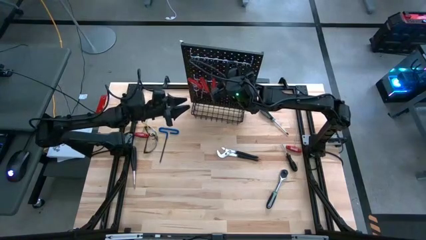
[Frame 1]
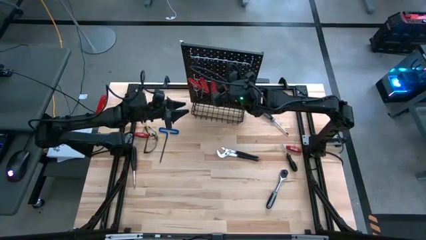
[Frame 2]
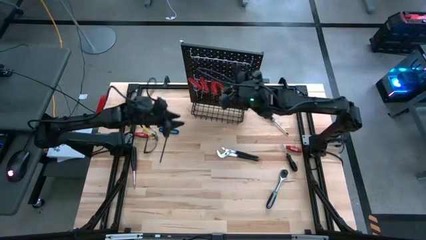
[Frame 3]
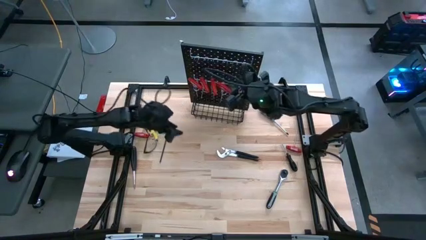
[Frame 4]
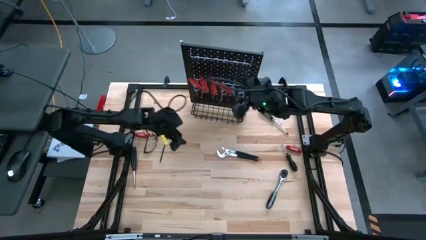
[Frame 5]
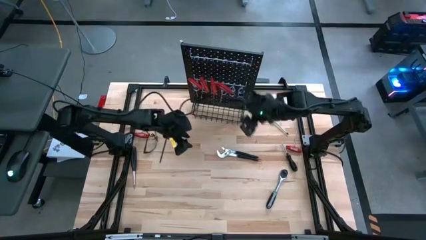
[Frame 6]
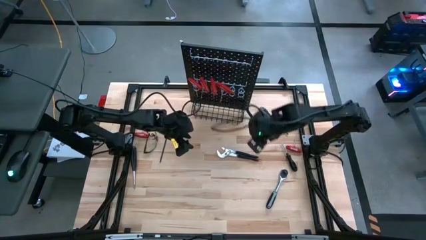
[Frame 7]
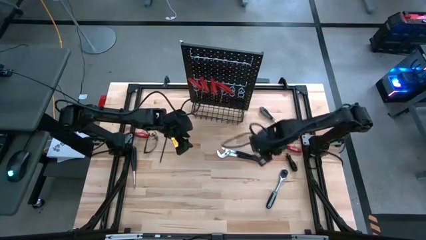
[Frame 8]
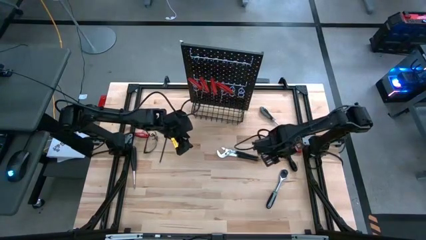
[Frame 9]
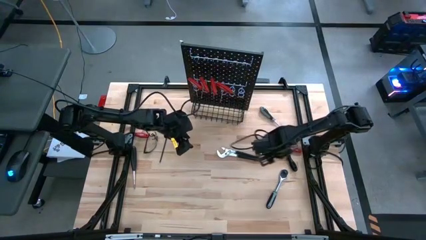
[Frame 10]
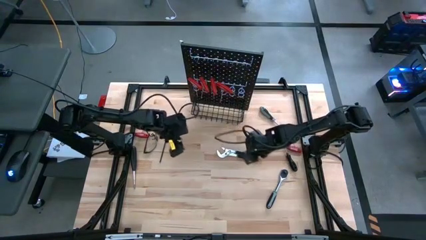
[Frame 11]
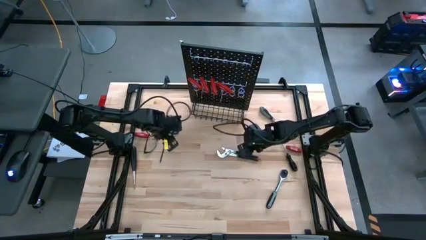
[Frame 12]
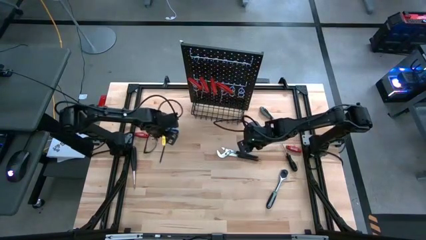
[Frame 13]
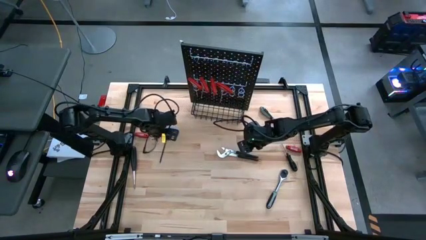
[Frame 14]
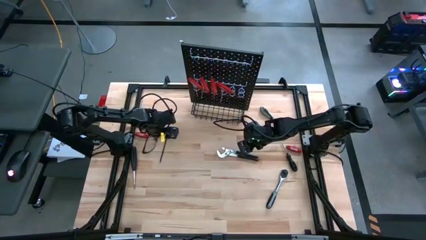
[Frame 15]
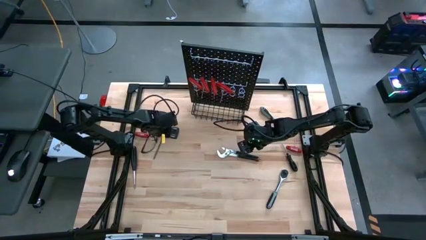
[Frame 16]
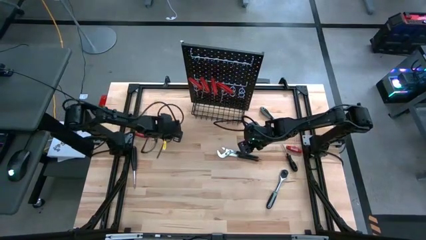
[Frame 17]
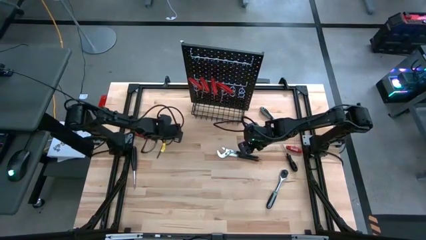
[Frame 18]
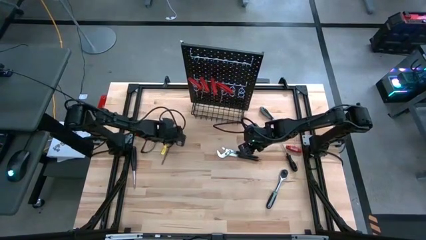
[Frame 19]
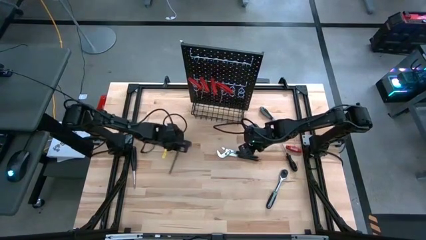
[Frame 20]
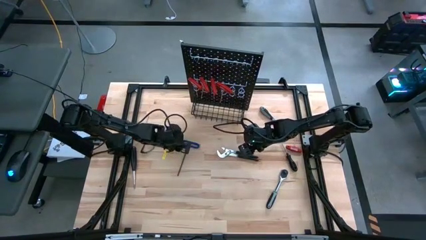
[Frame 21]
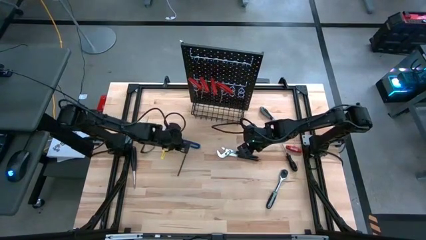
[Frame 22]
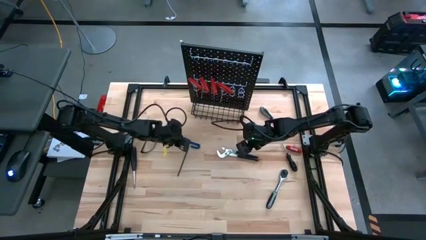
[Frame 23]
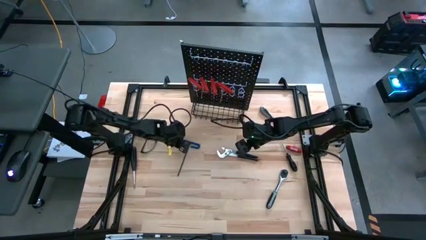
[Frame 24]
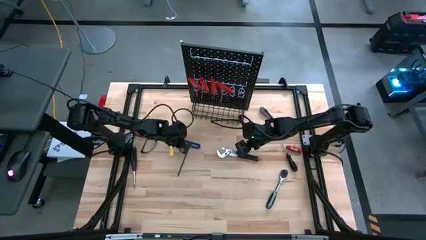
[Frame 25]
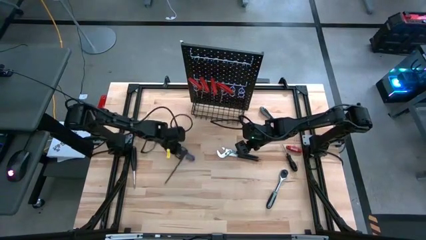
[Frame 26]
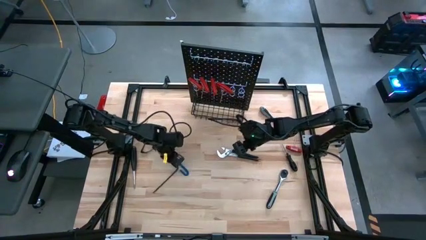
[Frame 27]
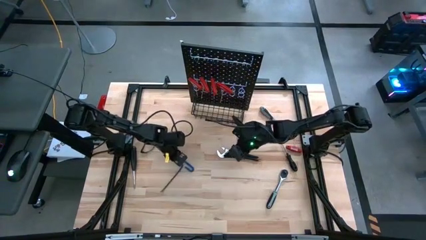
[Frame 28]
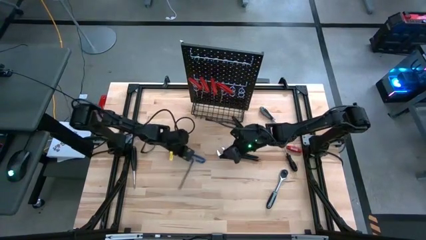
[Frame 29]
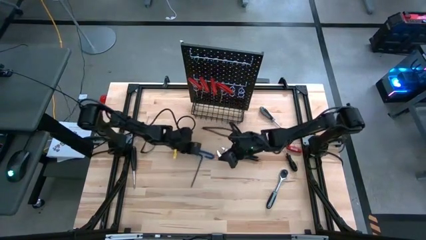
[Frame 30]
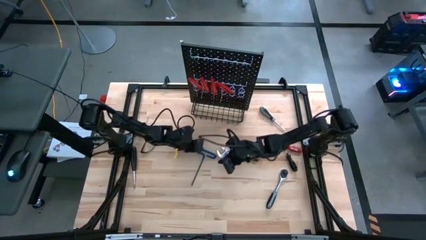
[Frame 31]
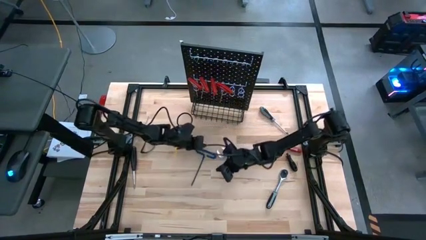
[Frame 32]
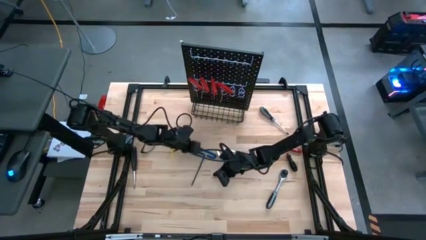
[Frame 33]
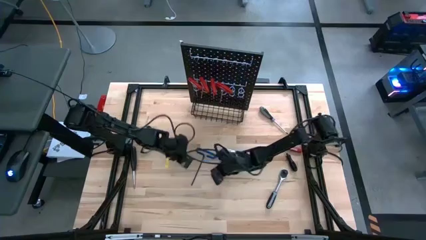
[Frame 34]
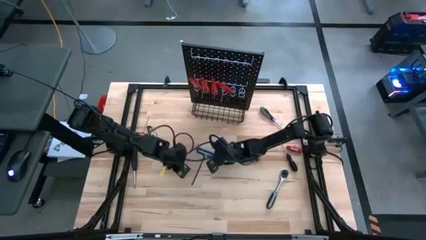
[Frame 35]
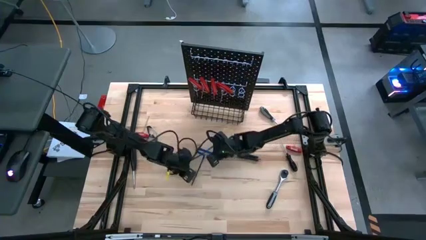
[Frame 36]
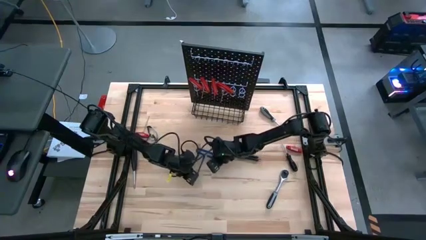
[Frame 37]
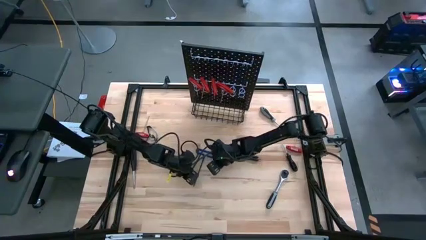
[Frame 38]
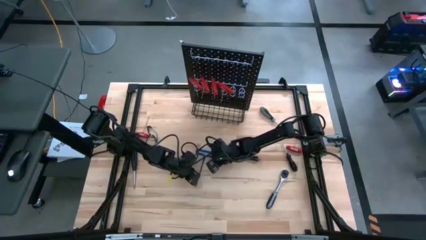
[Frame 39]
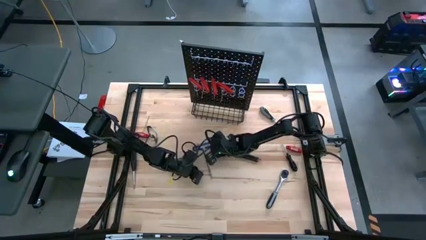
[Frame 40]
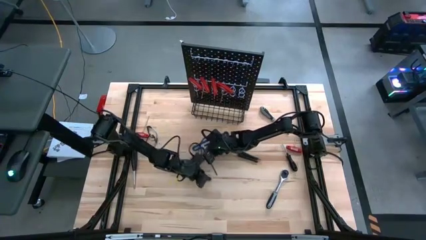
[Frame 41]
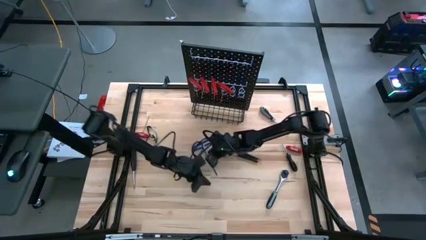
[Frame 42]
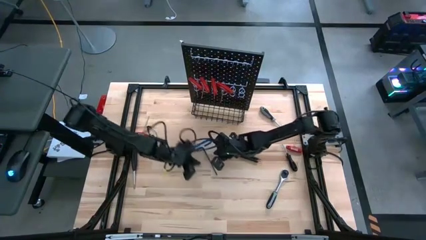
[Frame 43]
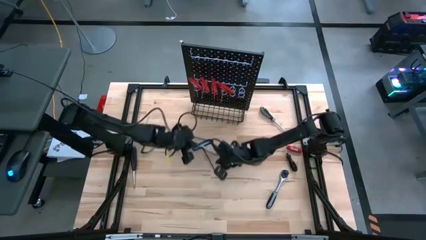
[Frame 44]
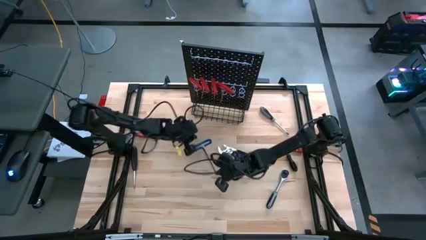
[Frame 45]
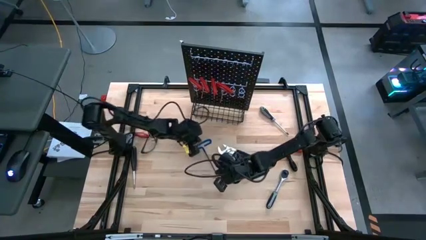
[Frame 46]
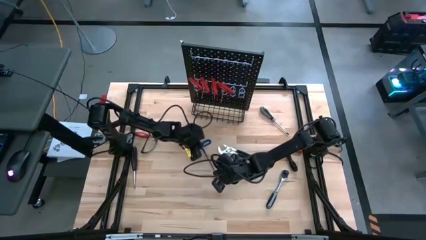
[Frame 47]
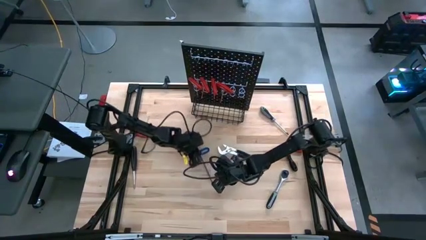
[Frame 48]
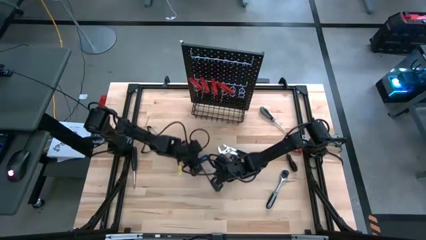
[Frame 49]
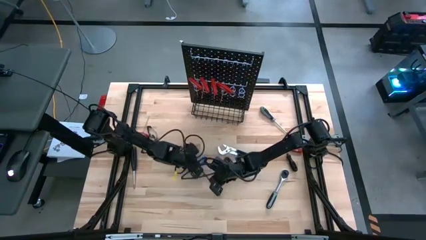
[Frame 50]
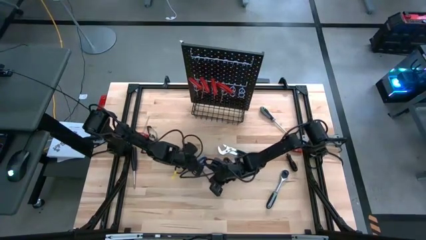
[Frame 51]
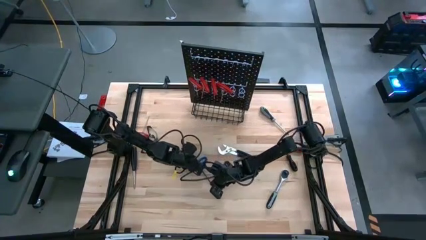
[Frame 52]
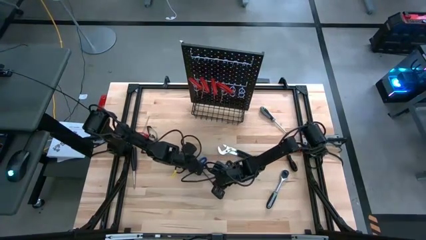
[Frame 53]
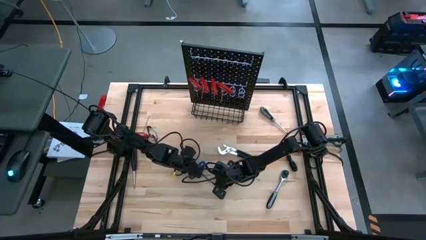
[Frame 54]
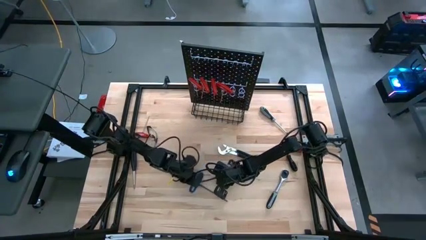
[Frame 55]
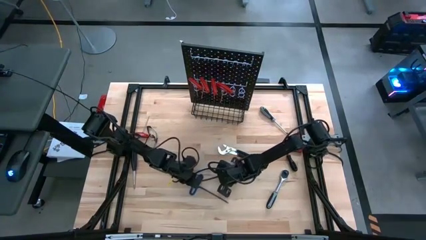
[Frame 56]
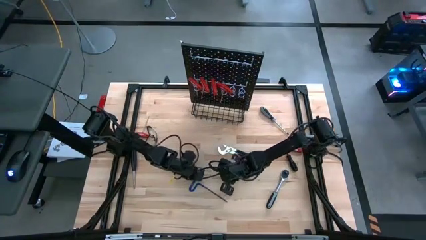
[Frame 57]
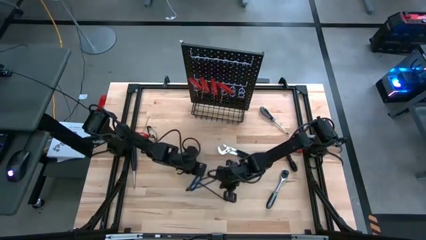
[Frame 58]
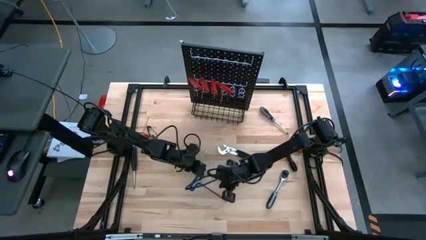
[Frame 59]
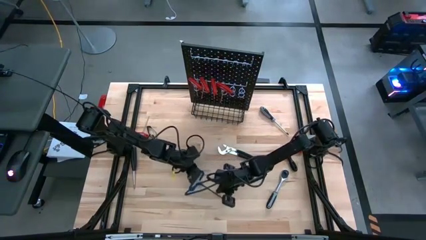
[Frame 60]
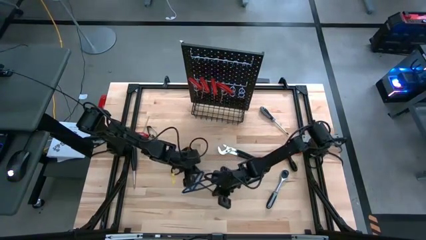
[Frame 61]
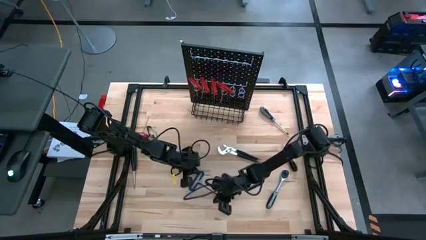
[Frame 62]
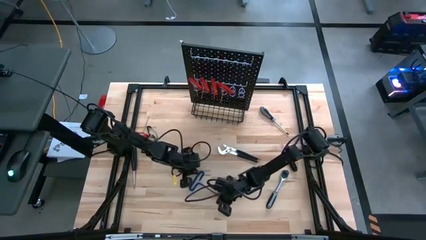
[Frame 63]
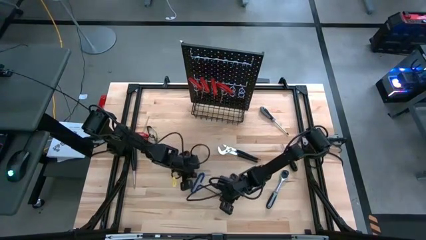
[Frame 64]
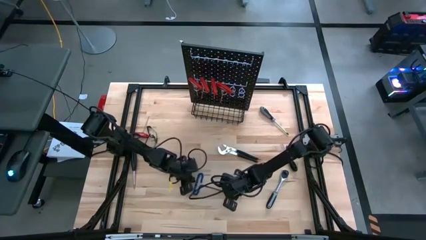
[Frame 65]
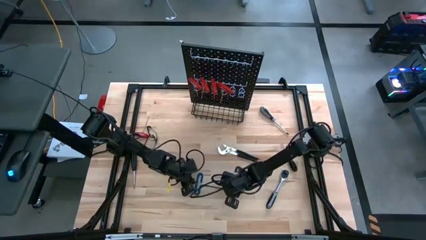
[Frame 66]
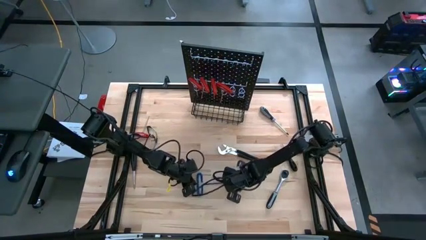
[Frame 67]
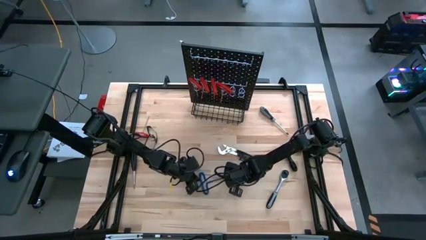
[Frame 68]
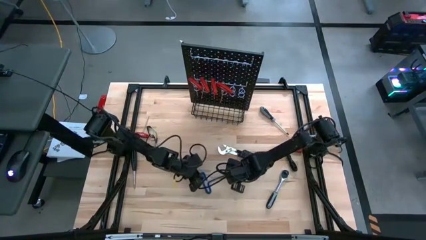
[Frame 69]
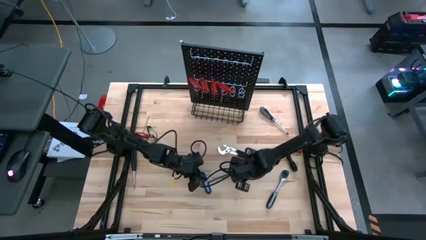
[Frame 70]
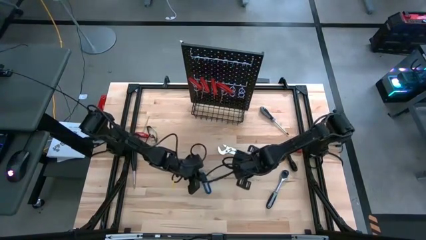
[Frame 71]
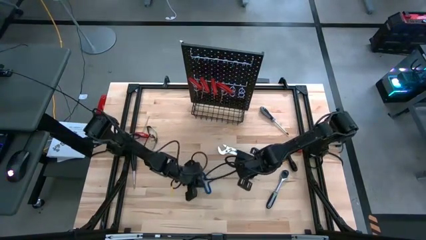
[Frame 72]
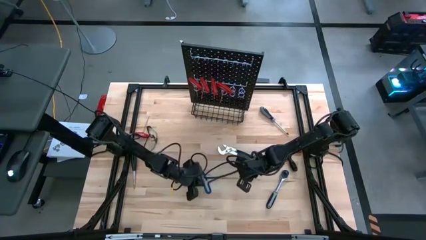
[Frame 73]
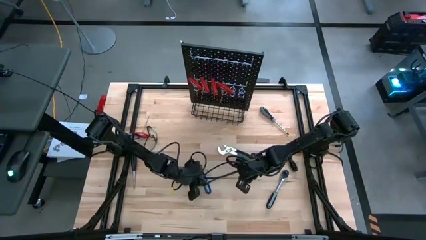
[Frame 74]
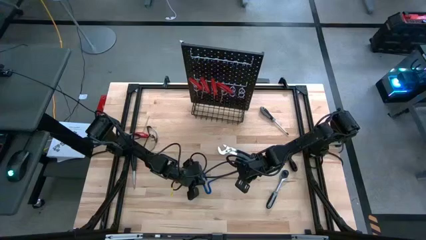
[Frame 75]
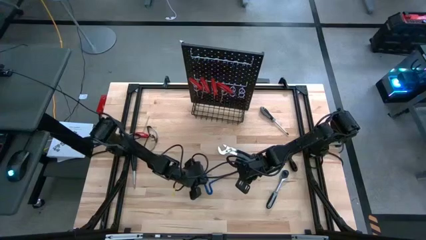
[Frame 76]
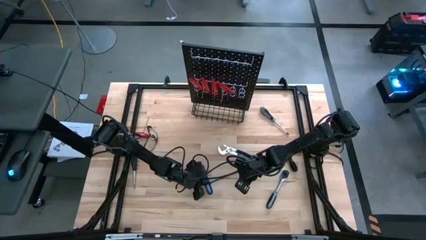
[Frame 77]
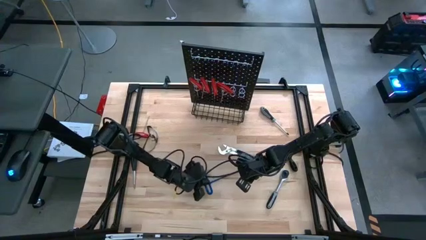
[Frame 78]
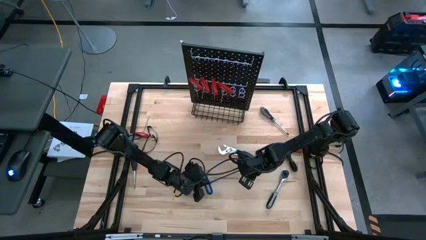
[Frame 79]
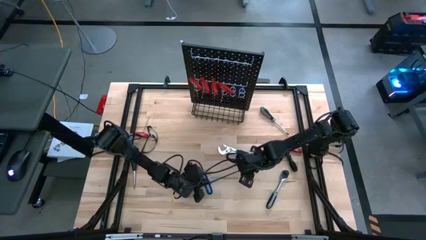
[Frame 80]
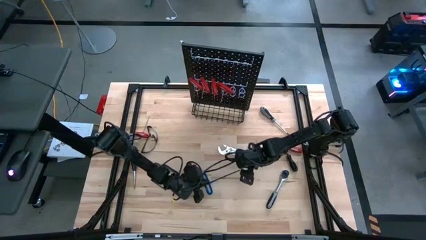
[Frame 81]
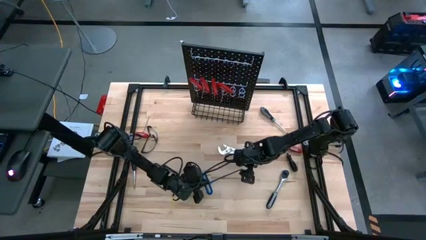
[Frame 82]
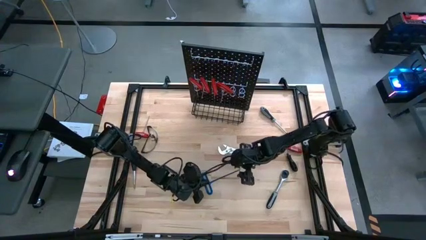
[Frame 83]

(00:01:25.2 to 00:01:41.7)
Task: Hang tools onto peg board
Hang the blue pick tool on the pegboard

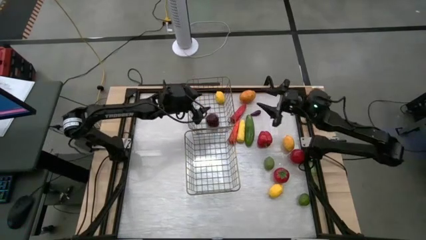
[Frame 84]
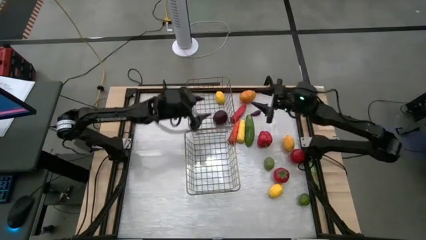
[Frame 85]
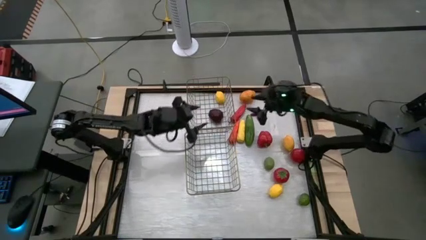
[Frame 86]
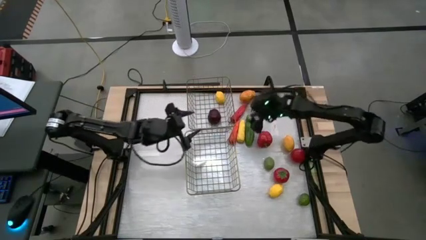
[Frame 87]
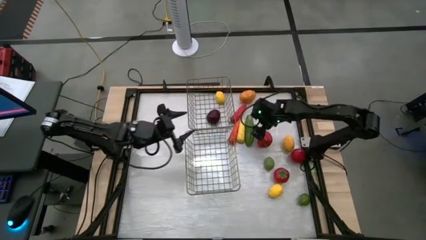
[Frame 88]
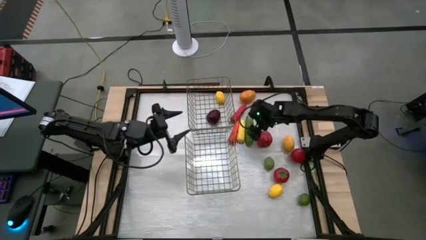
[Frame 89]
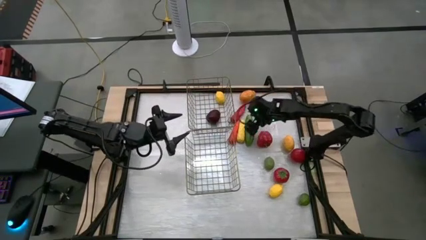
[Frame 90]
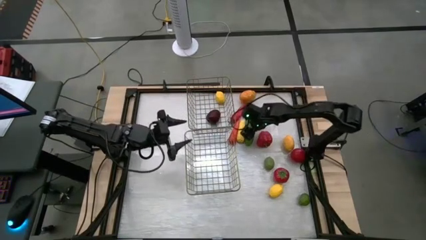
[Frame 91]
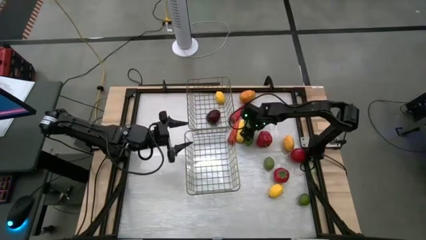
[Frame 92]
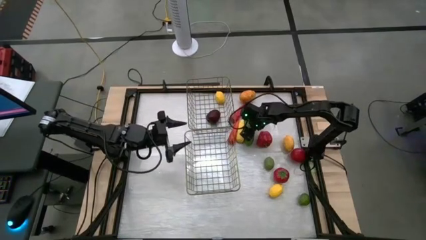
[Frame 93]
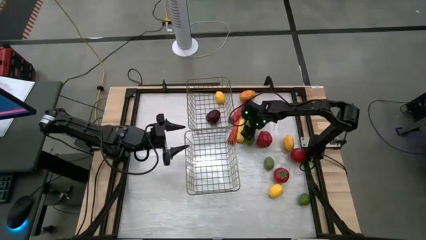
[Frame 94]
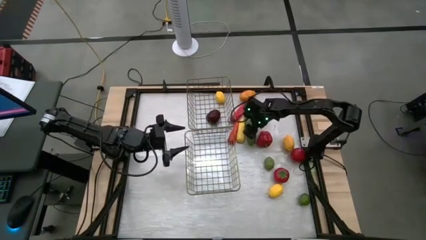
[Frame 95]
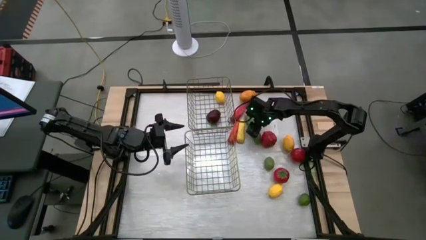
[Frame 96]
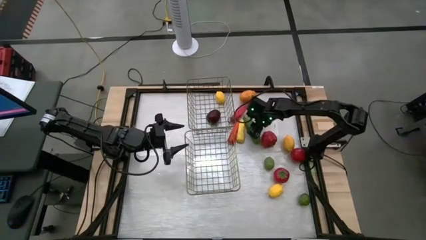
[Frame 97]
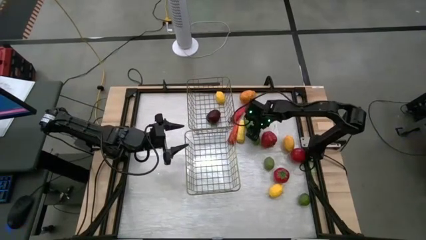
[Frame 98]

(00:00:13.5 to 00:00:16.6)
Task: Sort produce into baskets
Put the green cucumber into the bottom wire basket
